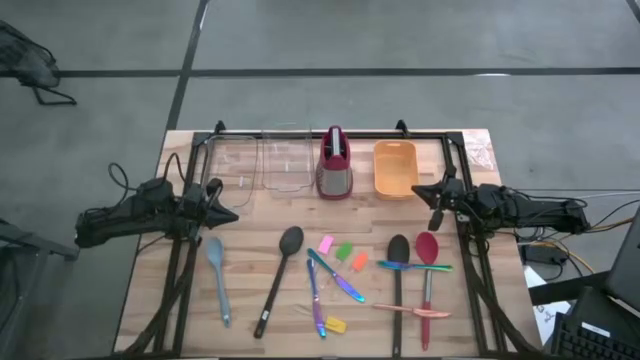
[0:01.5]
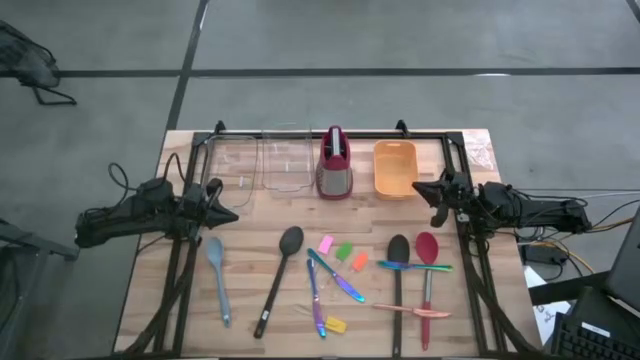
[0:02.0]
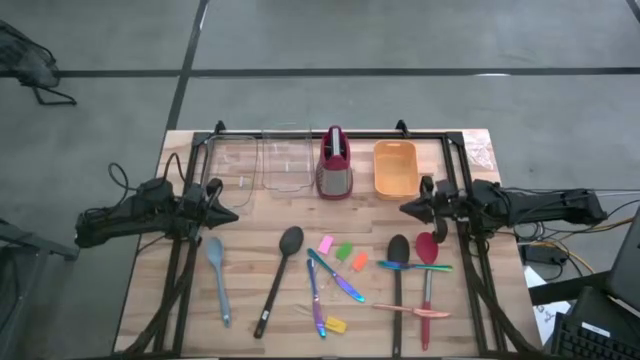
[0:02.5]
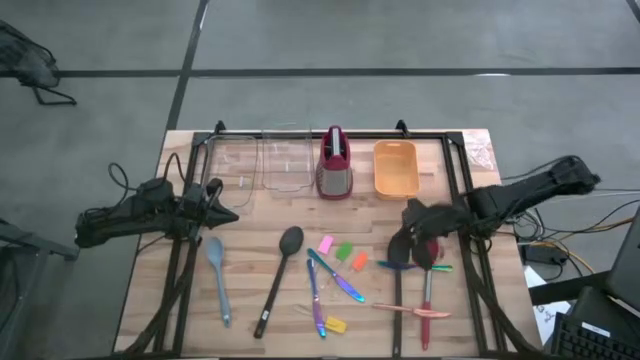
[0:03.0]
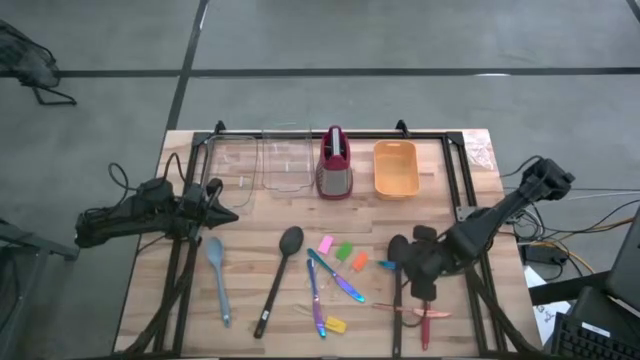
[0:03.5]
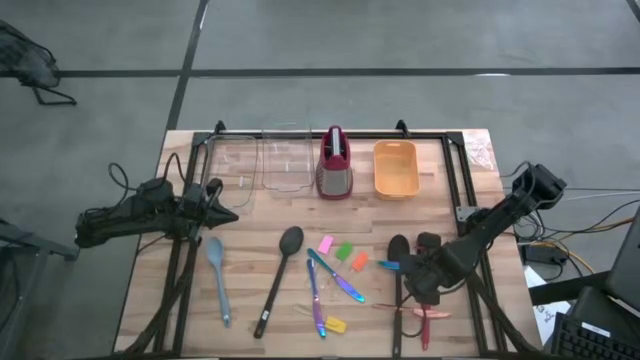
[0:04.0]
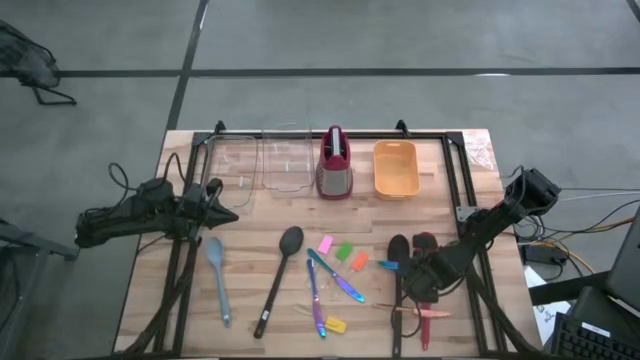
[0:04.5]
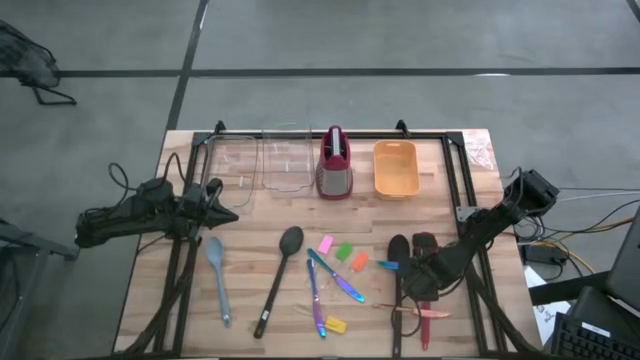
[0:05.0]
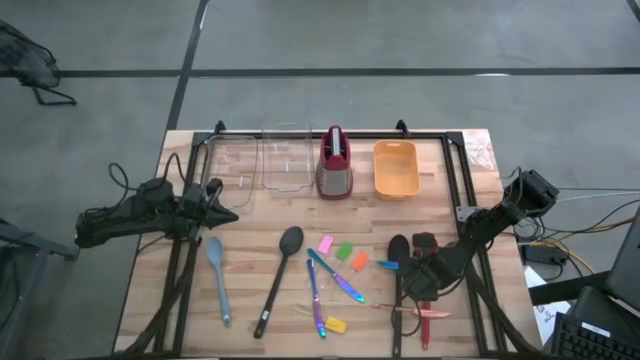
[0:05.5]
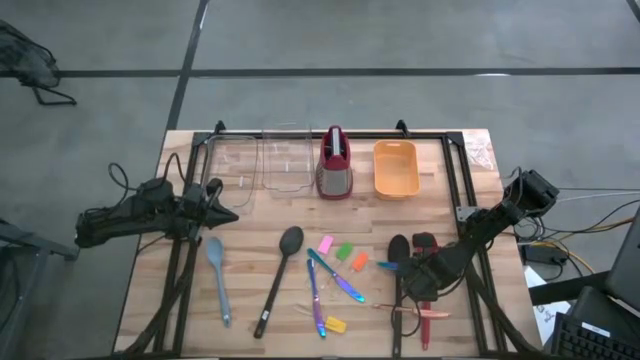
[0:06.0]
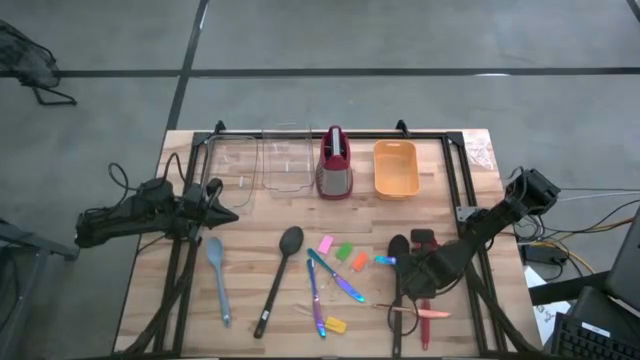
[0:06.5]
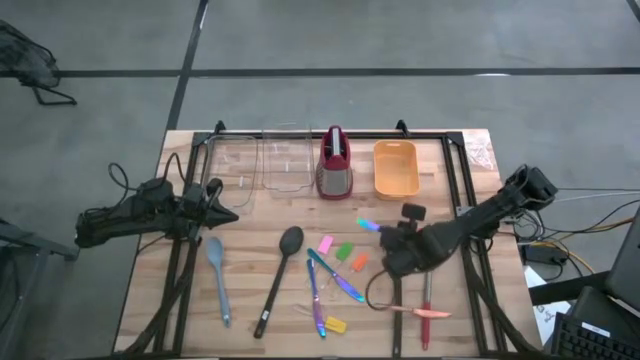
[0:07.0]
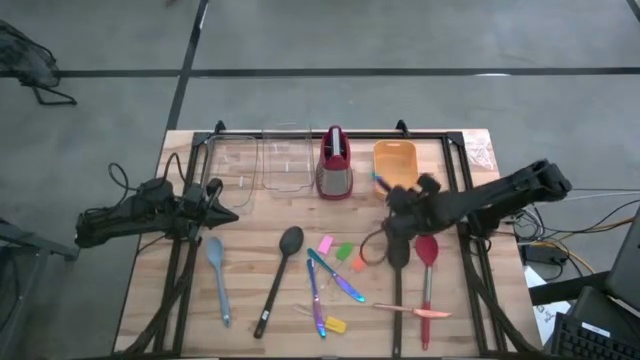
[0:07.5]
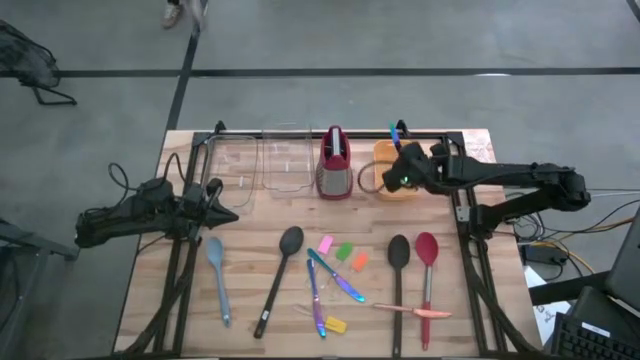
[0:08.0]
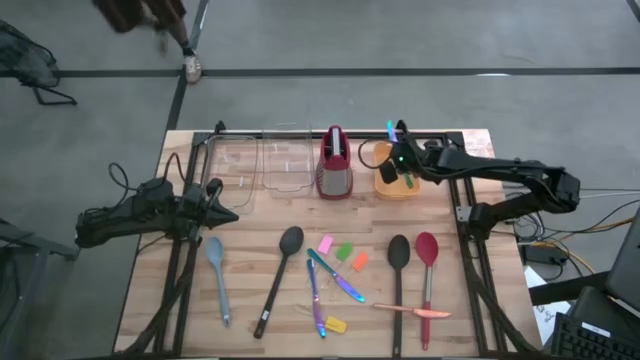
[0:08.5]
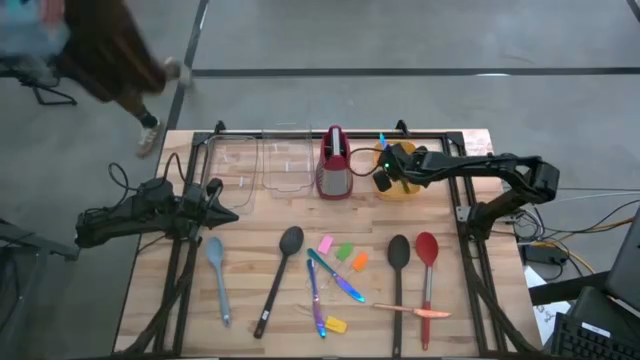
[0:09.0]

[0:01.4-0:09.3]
Task: Pick & Place Kitchen Items
Put the top right blue knife into the yellow bin

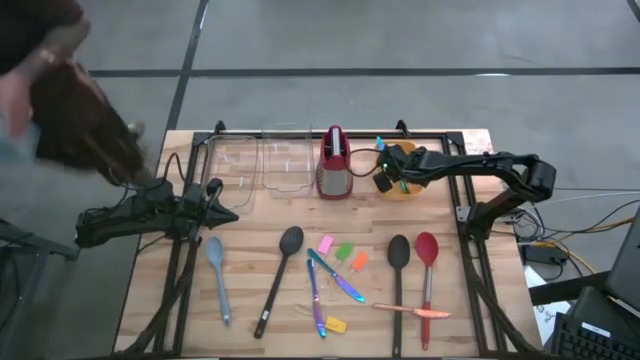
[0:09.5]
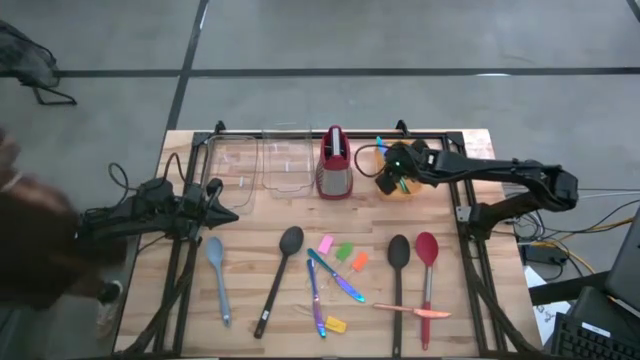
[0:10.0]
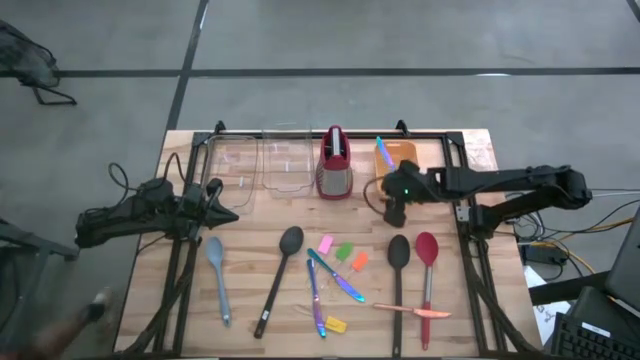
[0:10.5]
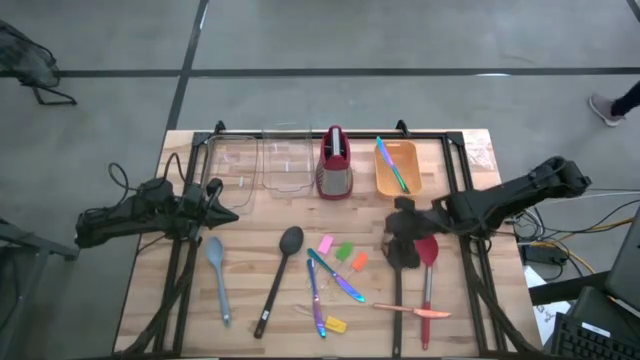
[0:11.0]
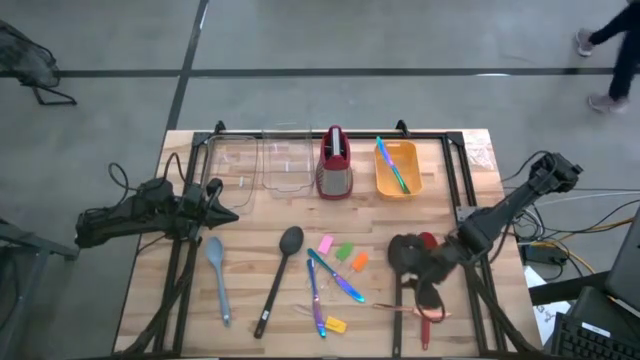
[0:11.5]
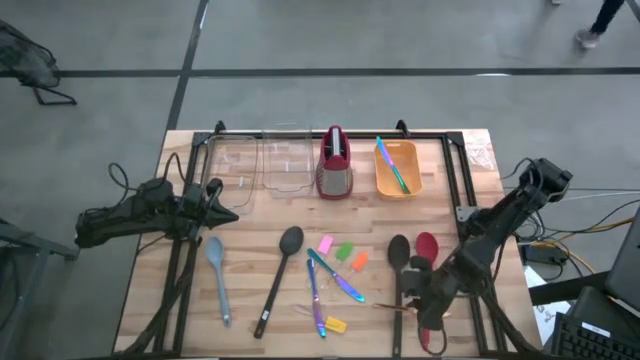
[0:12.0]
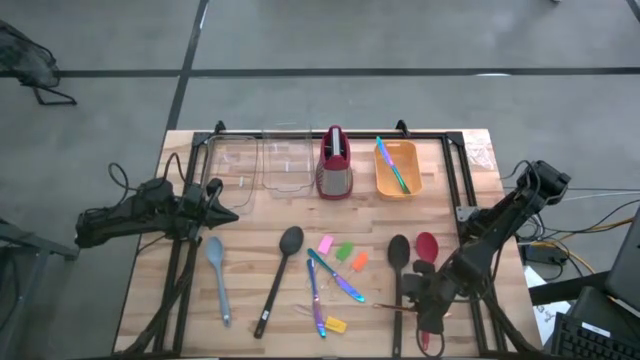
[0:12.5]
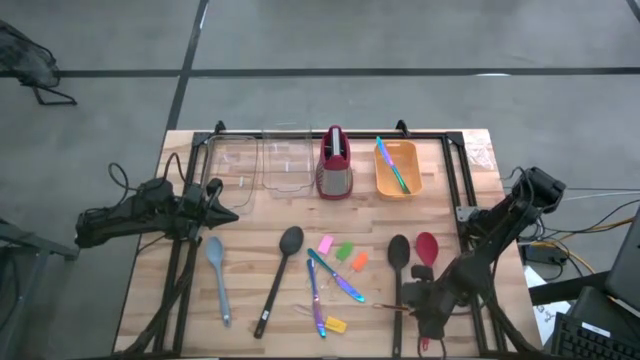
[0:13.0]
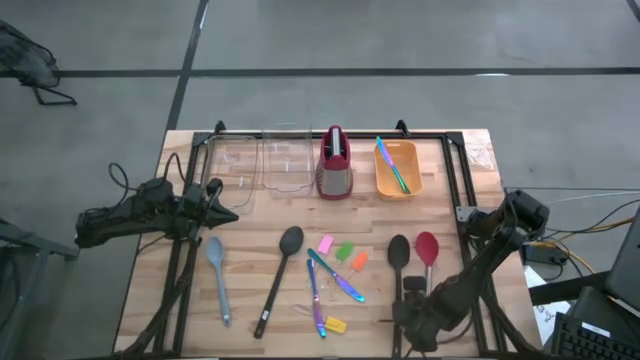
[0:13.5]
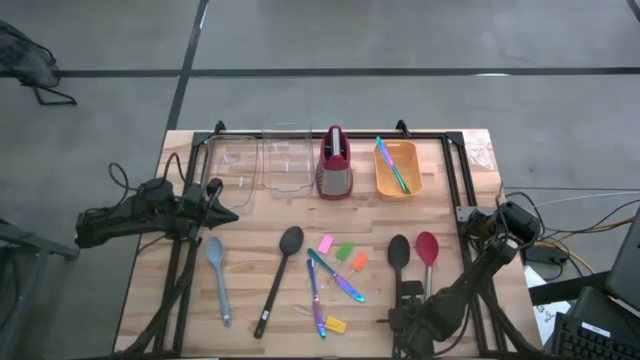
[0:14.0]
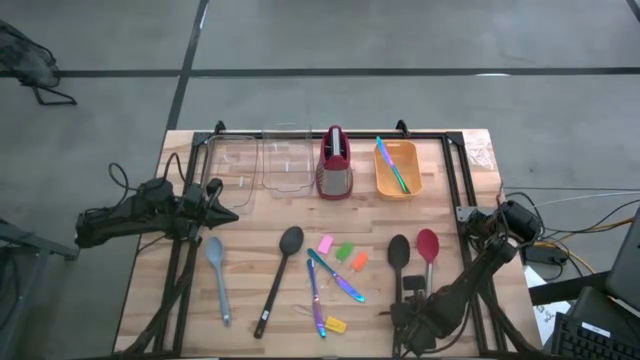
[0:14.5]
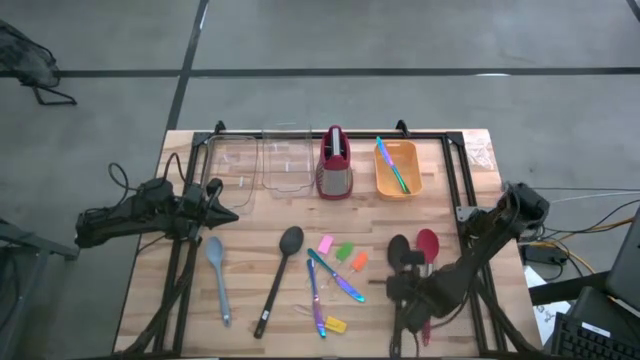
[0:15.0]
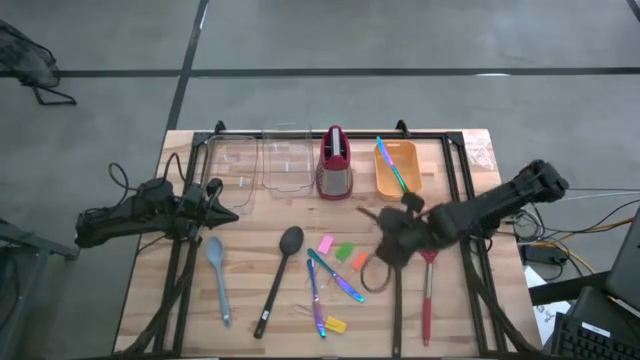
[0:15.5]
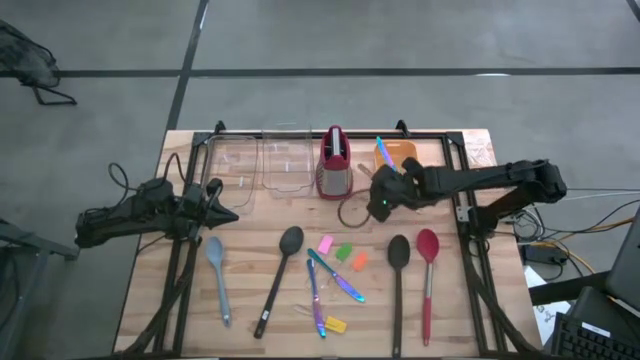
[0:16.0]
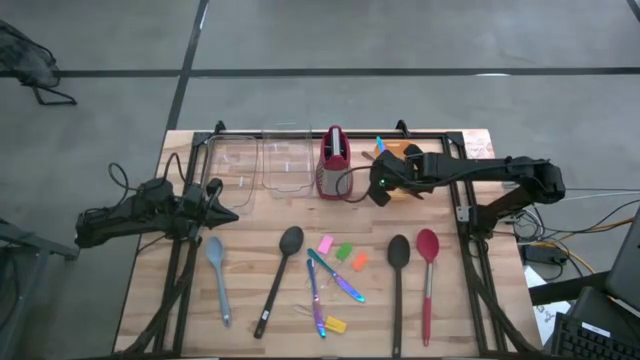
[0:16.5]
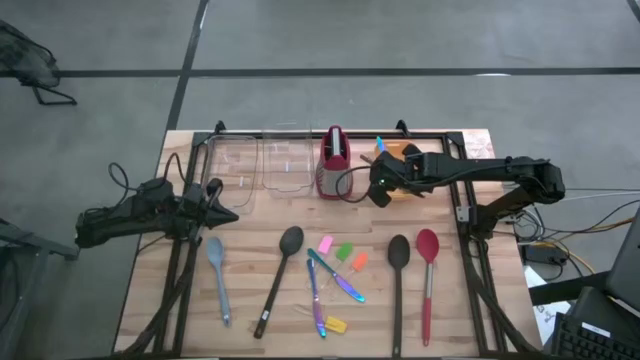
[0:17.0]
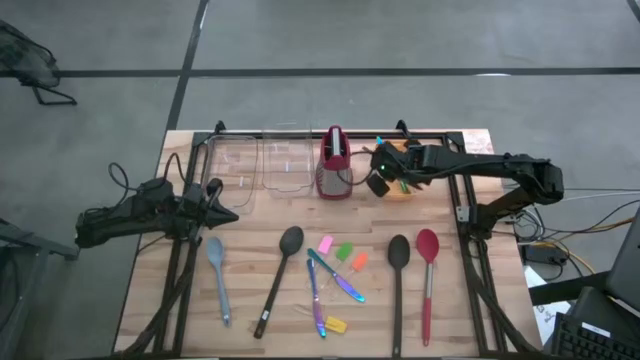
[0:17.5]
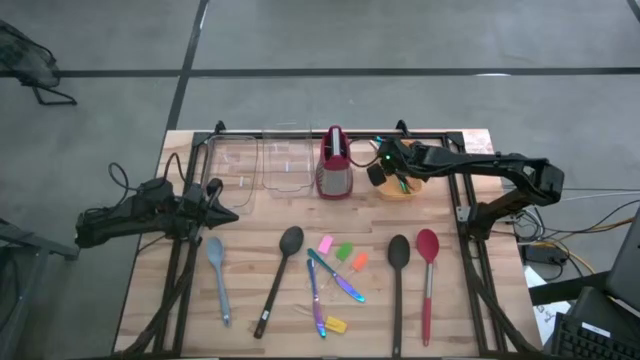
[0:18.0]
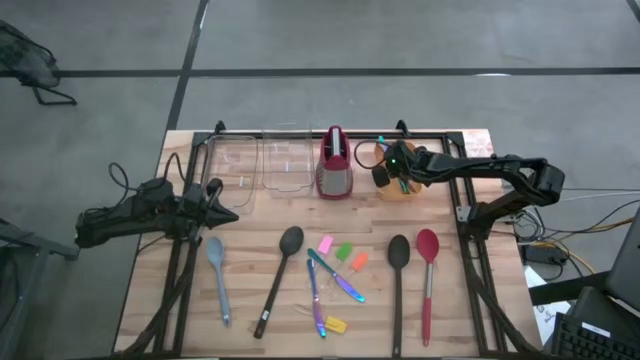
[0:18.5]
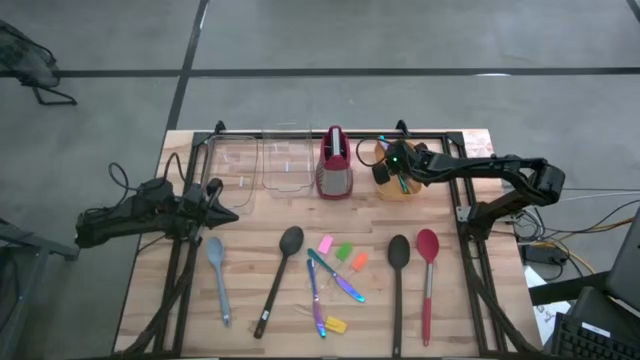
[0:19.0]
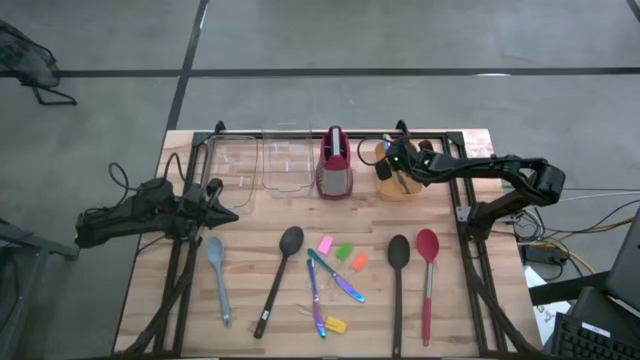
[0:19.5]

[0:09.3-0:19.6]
Put the bronze knife into the yellow bin
